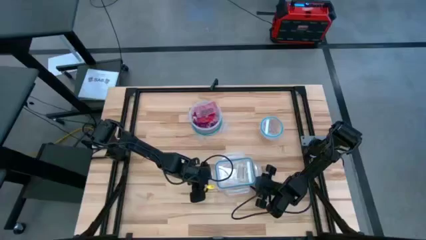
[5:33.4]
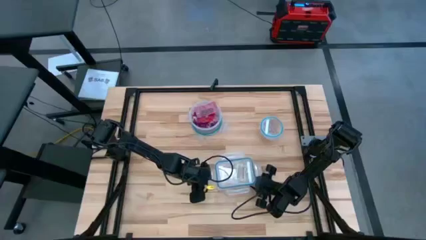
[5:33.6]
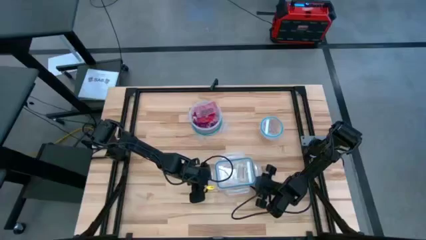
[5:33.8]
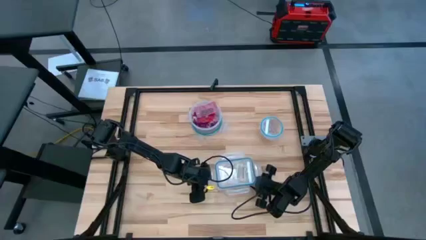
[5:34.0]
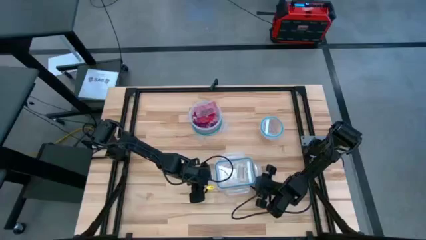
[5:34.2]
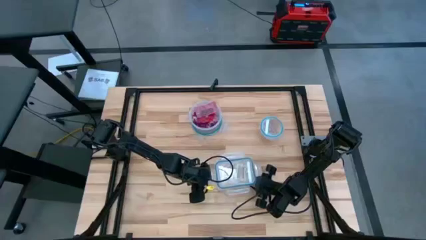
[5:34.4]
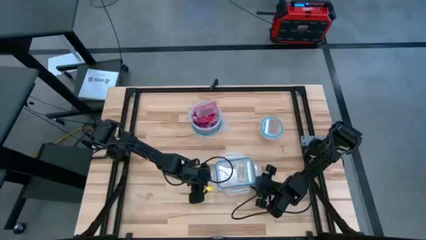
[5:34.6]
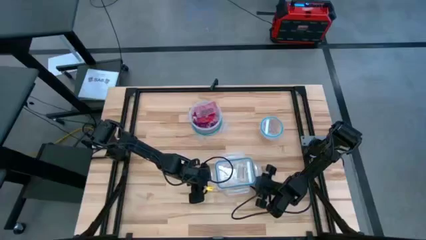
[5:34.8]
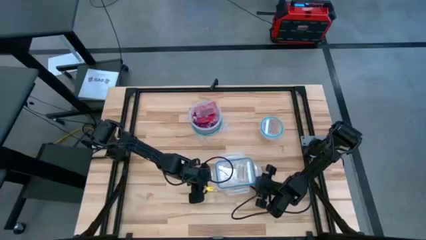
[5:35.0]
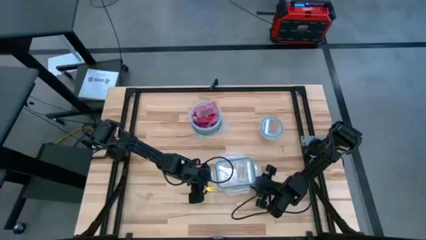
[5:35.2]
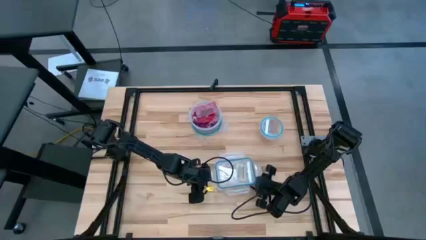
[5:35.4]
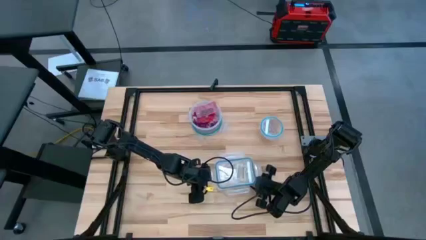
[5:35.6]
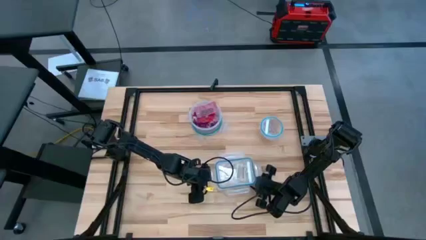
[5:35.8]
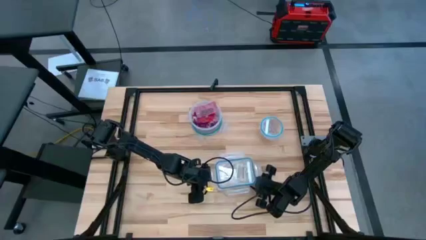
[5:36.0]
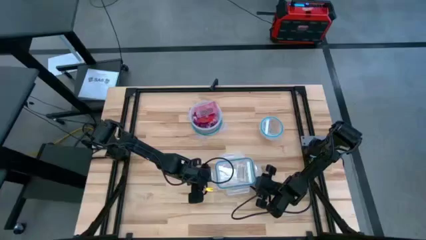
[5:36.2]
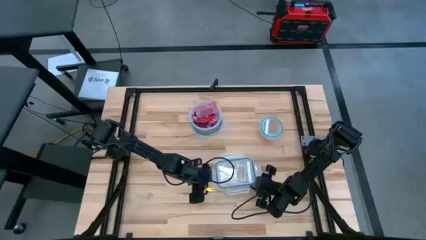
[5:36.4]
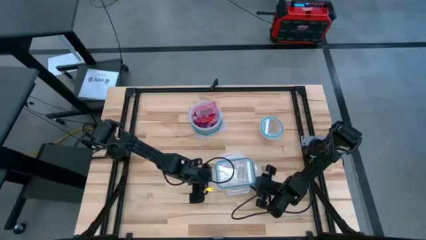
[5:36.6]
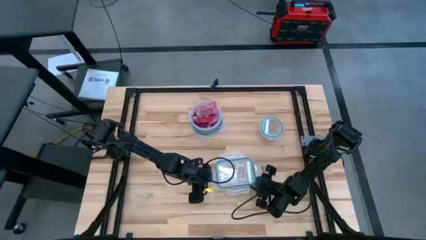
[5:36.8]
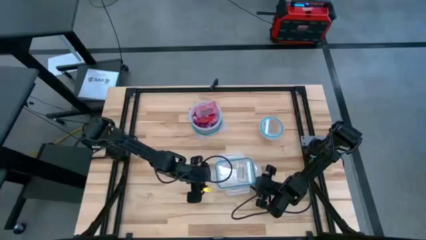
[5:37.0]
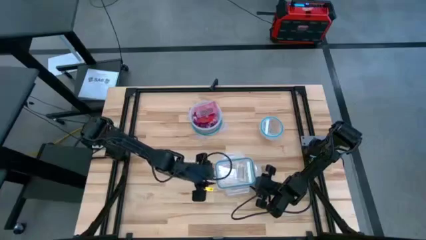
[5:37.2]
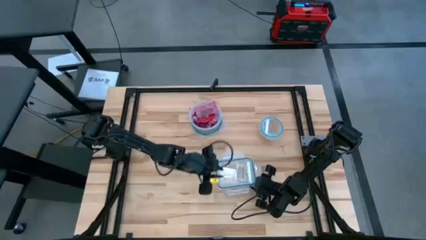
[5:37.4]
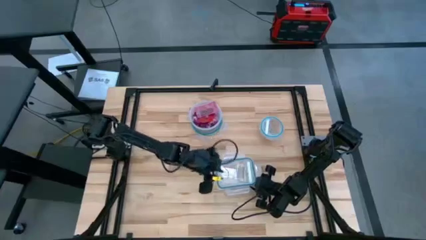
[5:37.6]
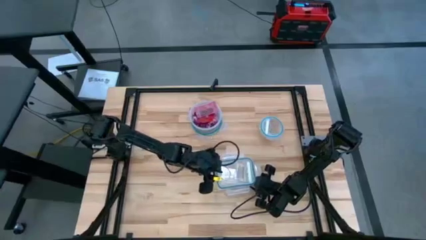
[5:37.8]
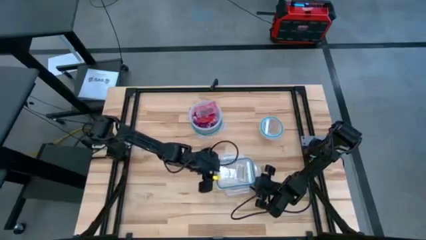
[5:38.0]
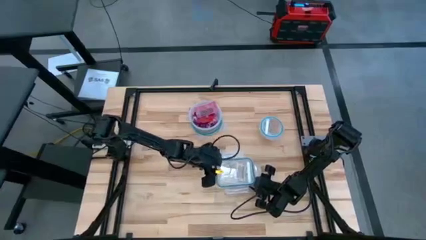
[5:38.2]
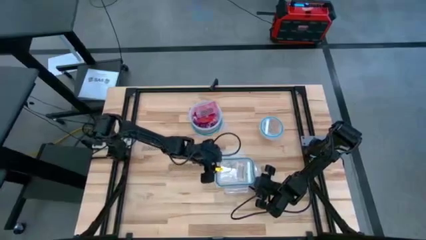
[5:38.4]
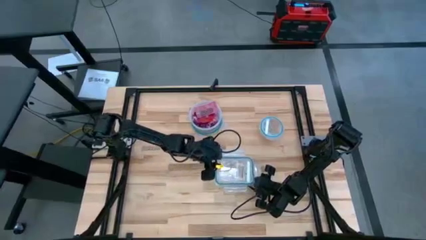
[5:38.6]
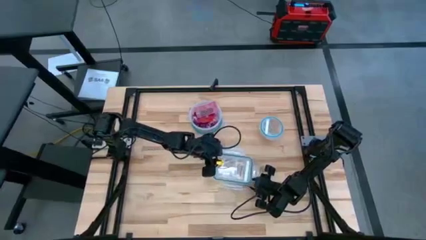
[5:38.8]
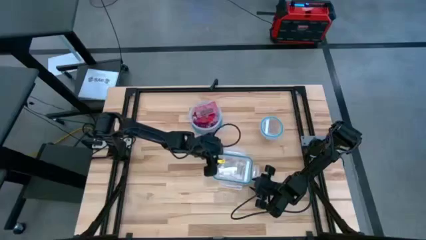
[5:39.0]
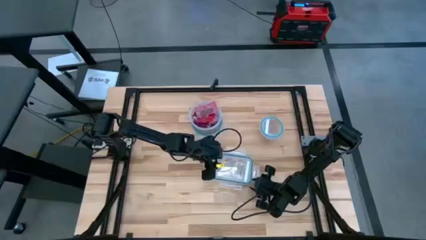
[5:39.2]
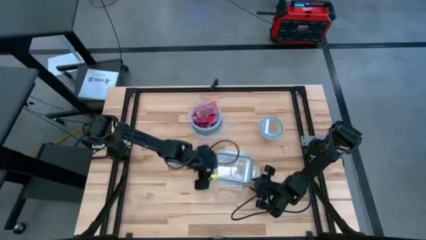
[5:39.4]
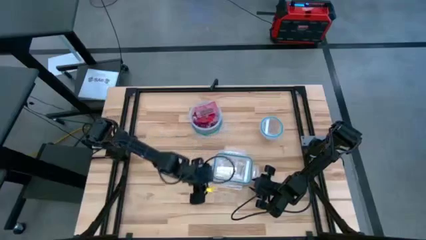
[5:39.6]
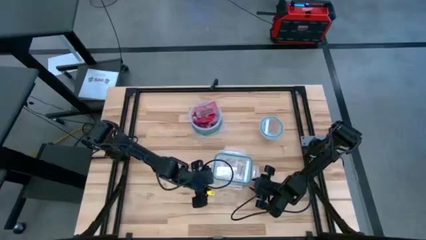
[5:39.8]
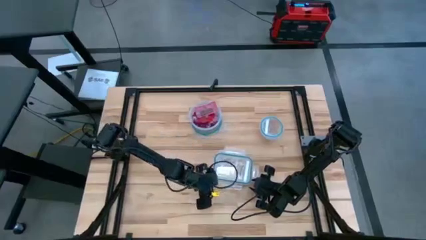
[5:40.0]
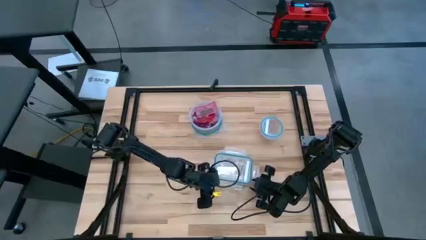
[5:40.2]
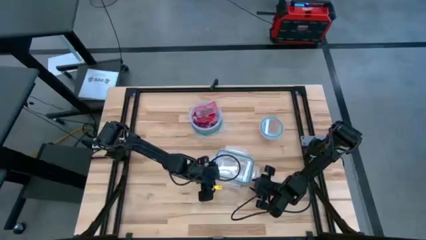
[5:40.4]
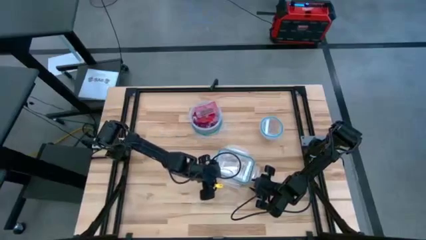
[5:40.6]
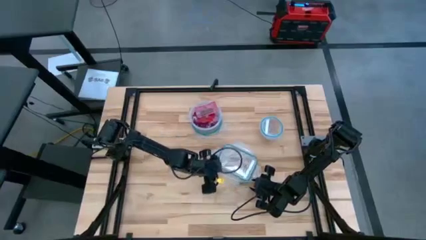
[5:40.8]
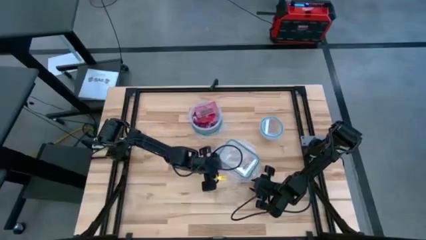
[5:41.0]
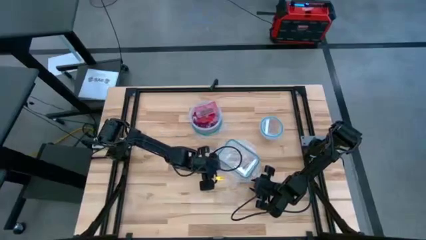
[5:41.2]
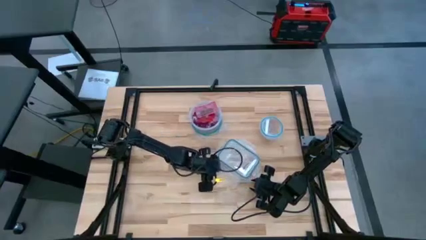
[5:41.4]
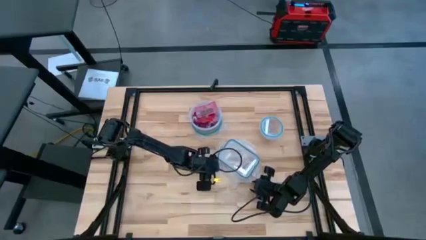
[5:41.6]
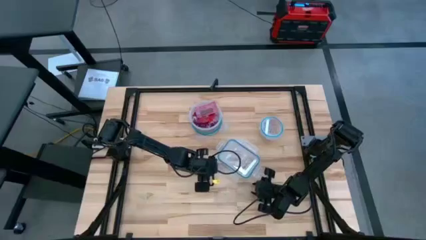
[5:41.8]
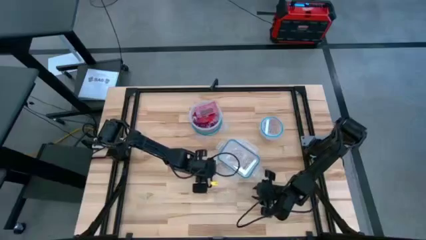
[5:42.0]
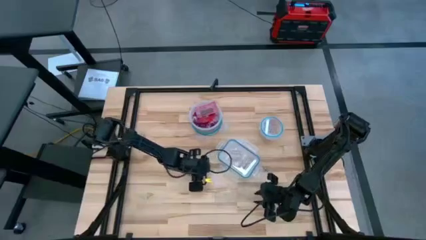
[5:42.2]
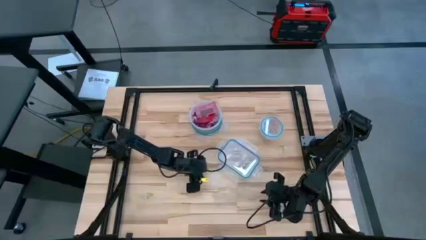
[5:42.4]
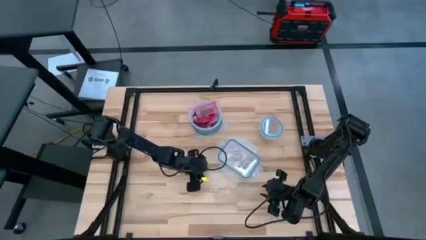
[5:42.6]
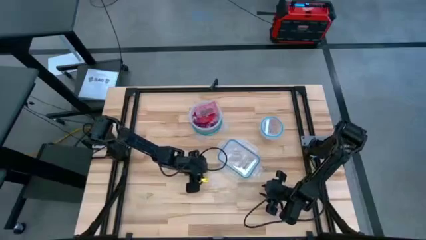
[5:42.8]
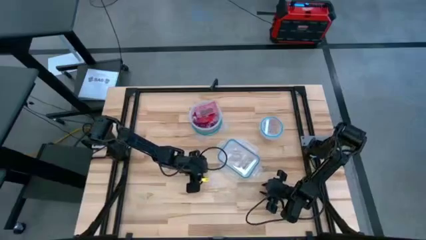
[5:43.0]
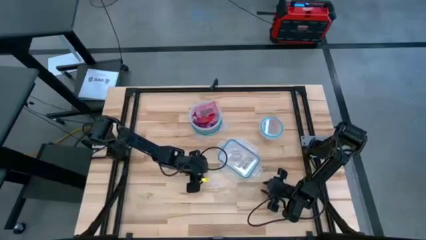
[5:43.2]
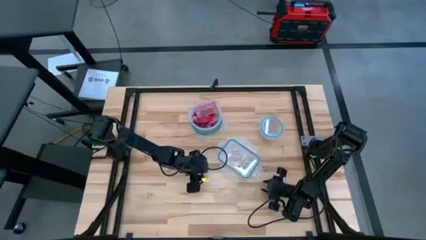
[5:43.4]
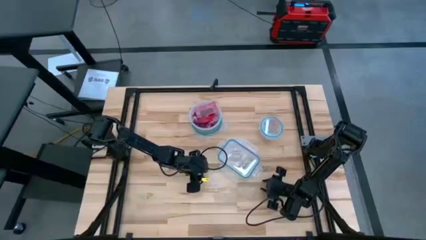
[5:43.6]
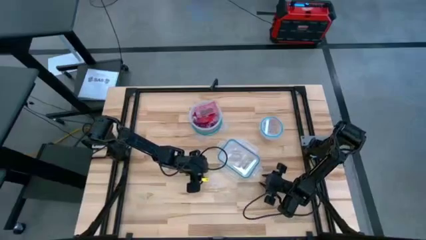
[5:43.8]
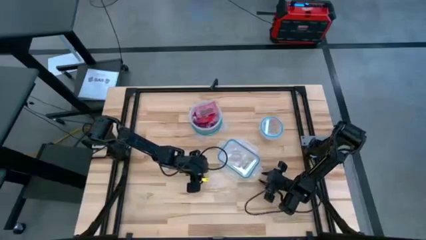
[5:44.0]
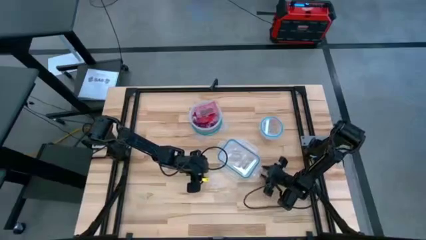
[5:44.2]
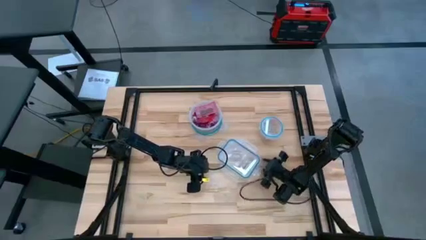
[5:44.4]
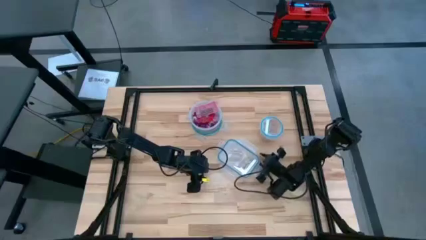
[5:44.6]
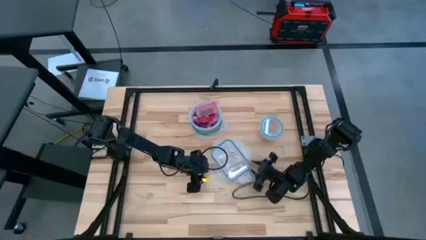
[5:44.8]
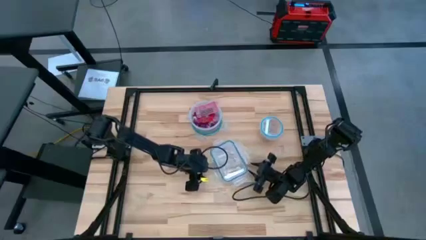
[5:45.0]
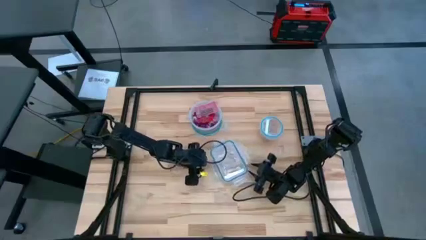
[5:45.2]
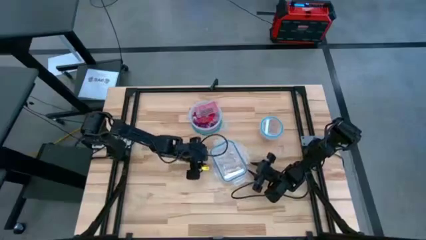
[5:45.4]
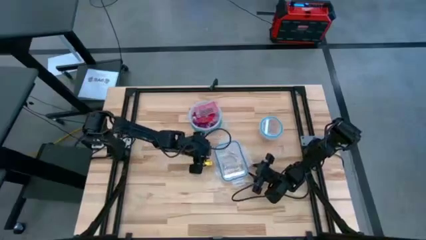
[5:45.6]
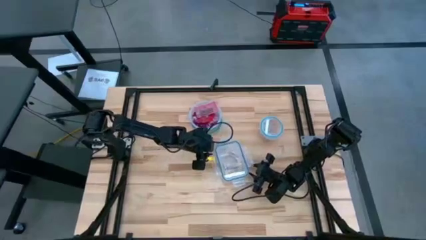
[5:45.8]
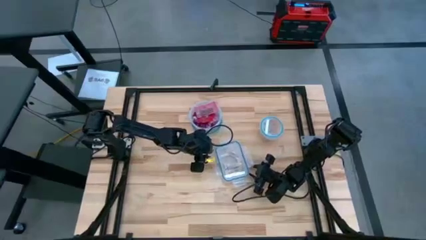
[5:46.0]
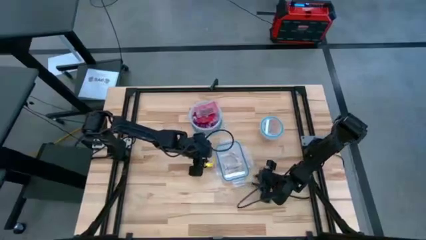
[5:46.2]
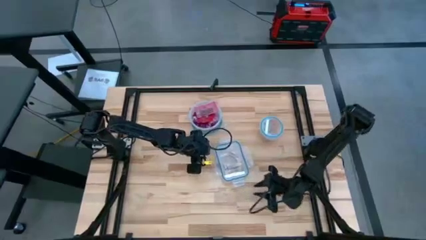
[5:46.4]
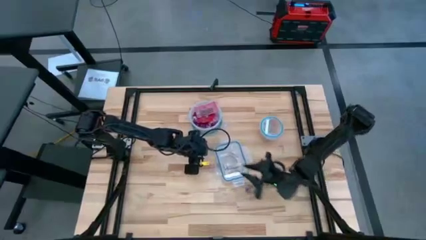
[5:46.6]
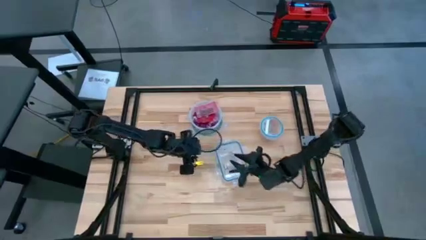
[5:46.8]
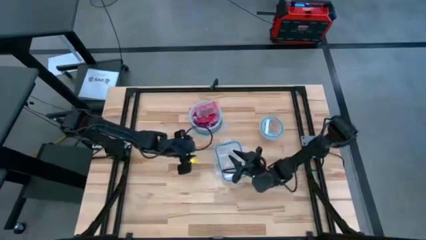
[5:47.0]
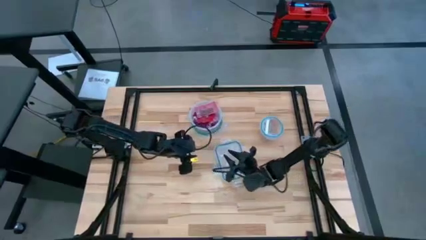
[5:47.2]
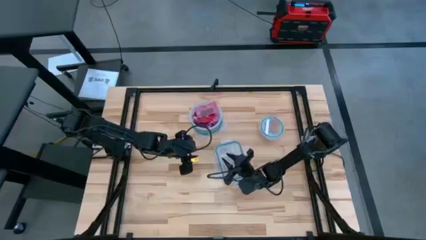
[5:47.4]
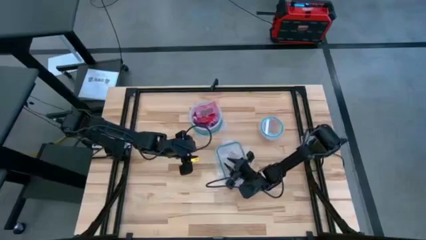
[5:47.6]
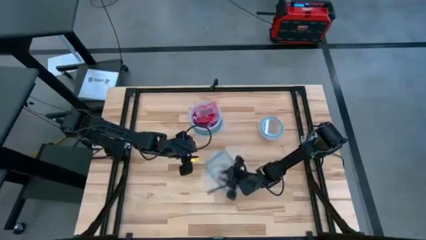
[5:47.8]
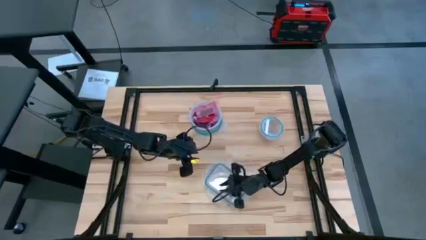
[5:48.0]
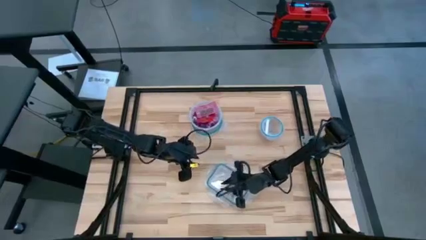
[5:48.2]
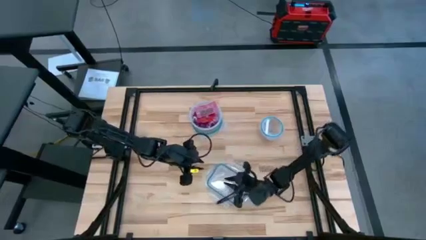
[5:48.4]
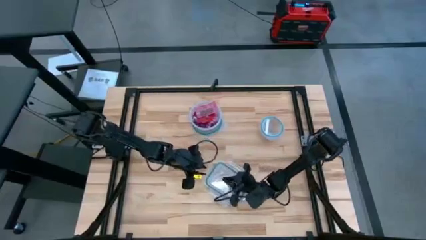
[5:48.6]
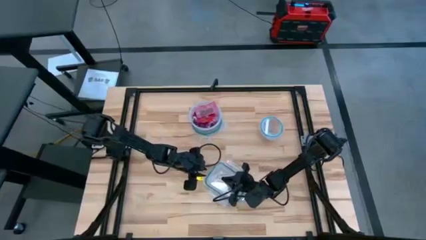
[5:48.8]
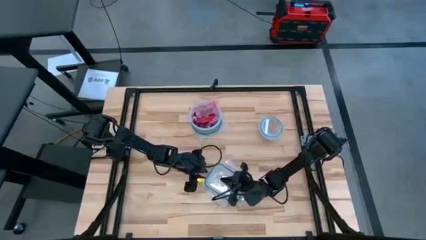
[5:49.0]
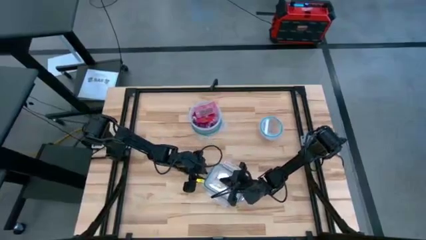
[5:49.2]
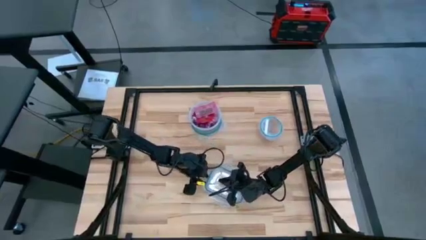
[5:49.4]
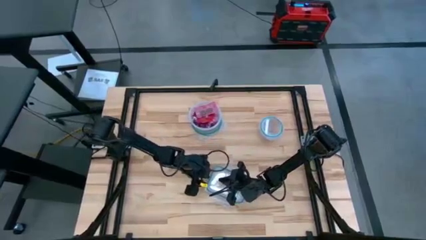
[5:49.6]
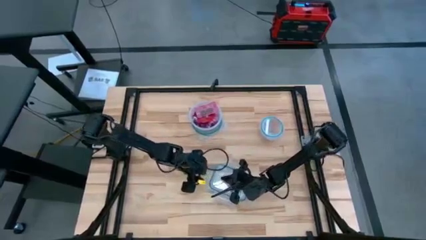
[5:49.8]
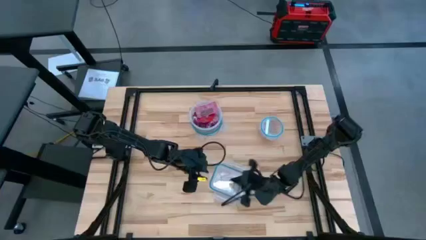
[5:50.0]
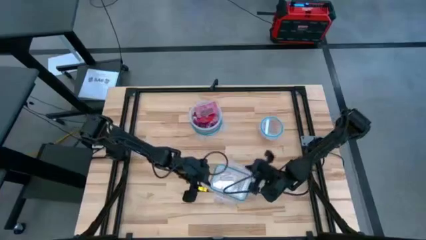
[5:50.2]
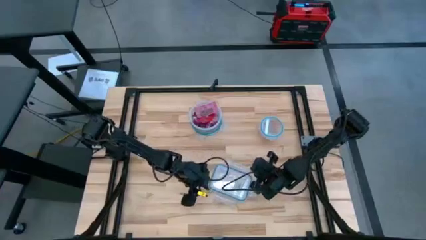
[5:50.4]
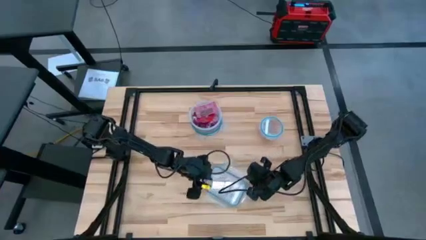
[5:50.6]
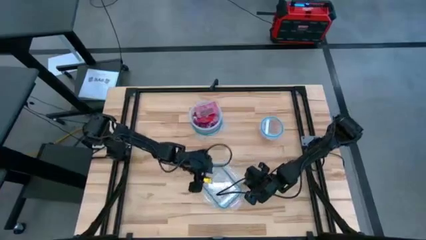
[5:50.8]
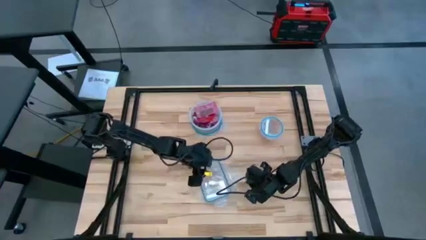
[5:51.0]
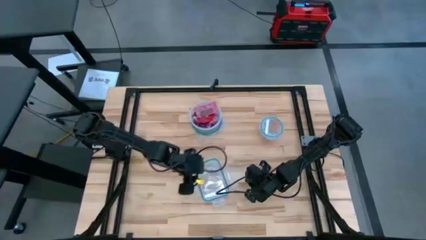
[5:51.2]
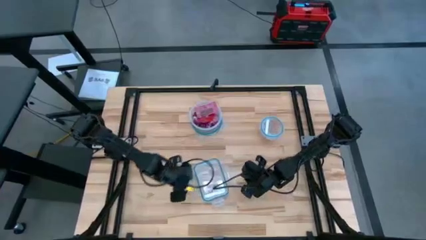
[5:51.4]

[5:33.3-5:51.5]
Task: Sort candy
Close the rectangular transparent bin
